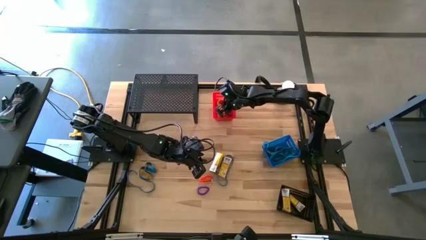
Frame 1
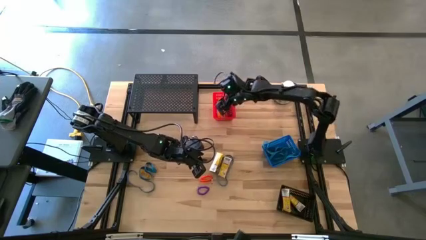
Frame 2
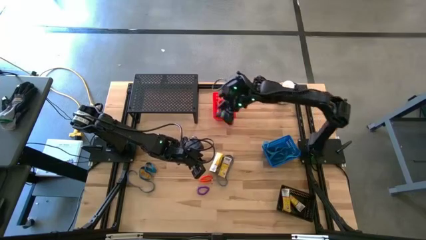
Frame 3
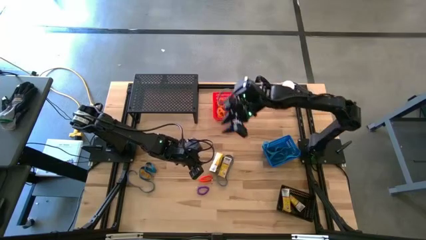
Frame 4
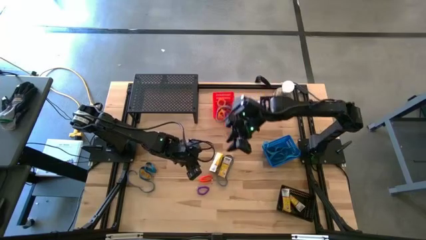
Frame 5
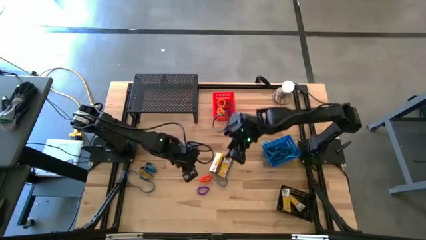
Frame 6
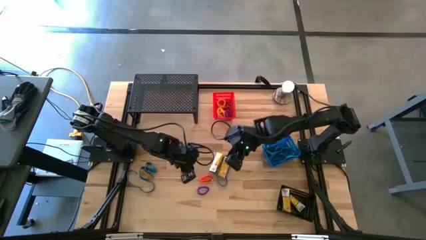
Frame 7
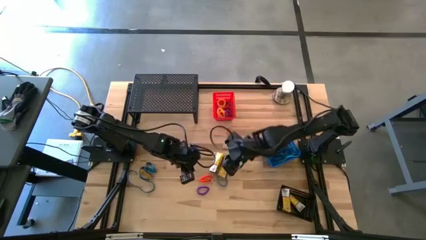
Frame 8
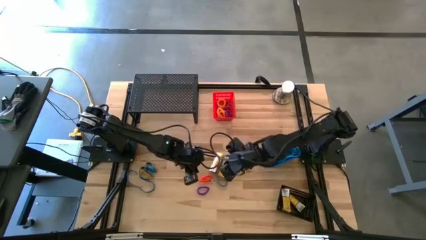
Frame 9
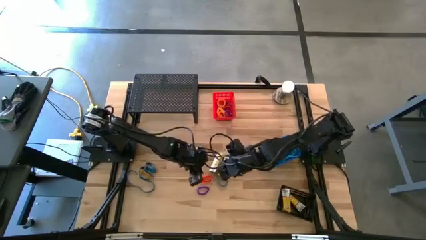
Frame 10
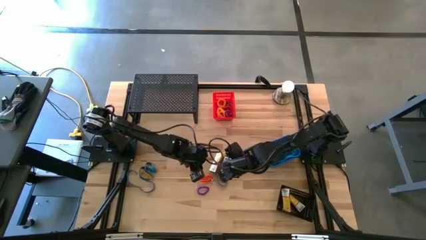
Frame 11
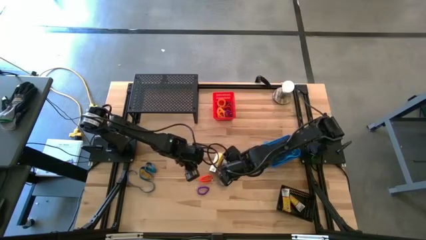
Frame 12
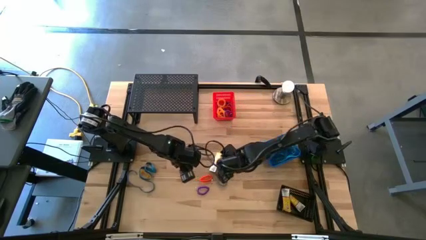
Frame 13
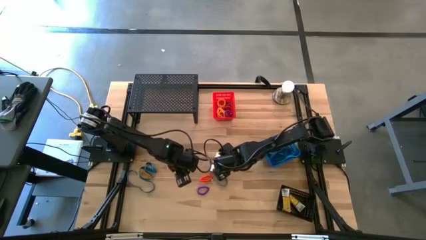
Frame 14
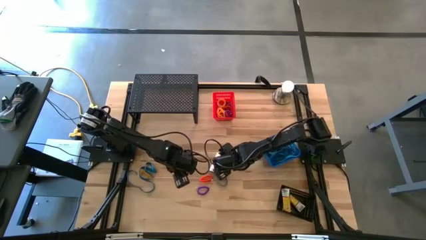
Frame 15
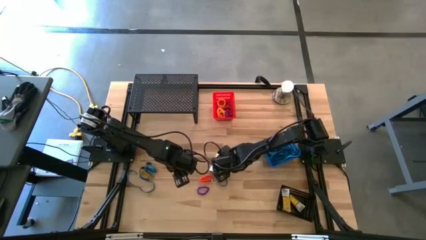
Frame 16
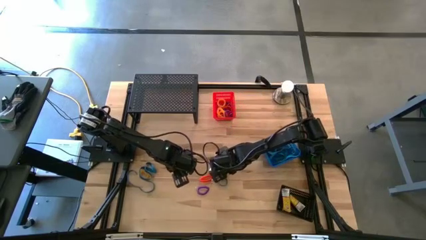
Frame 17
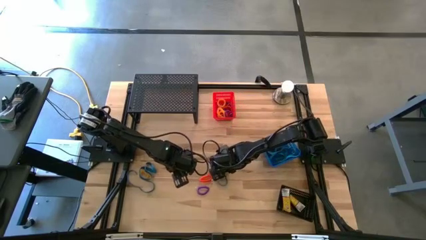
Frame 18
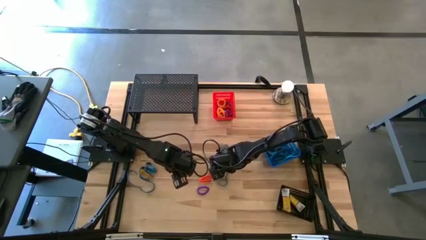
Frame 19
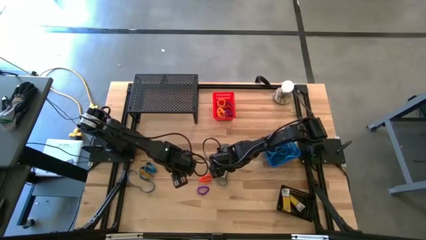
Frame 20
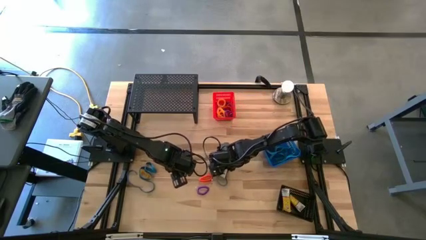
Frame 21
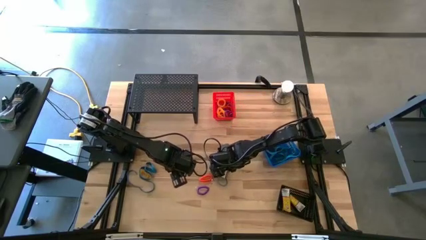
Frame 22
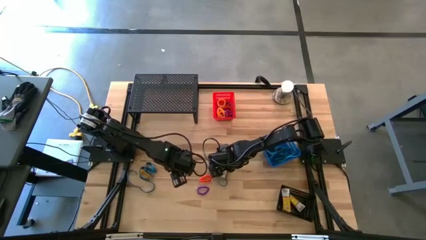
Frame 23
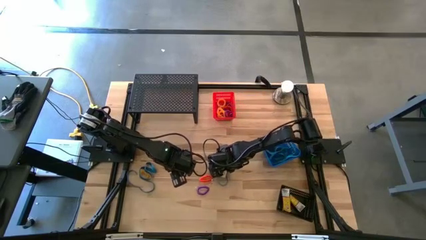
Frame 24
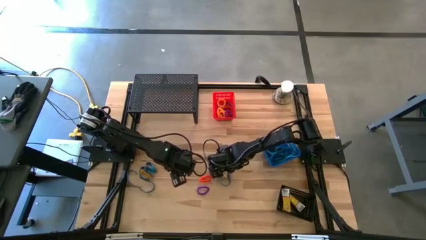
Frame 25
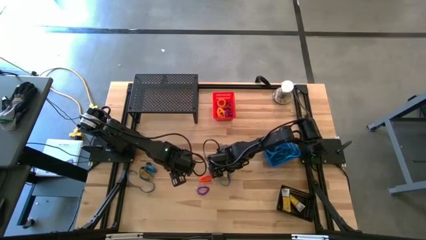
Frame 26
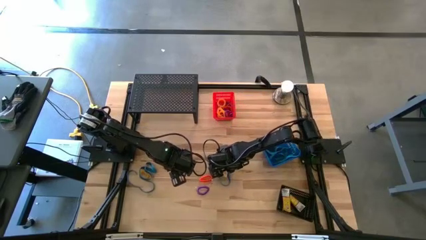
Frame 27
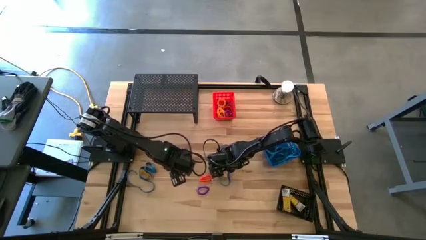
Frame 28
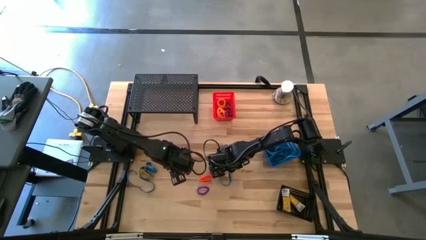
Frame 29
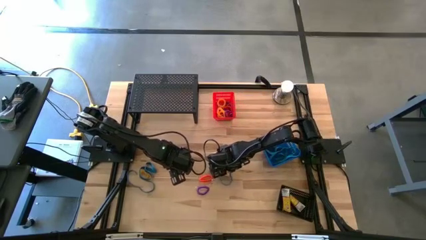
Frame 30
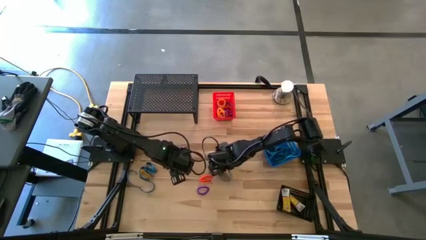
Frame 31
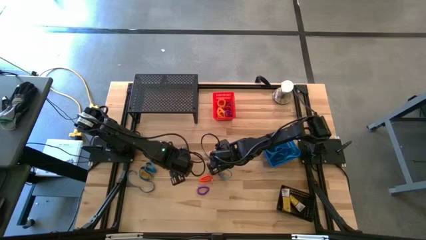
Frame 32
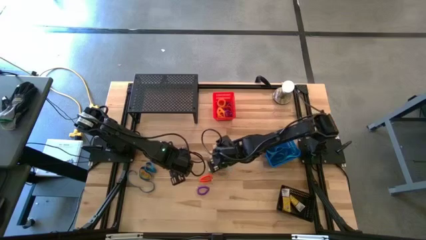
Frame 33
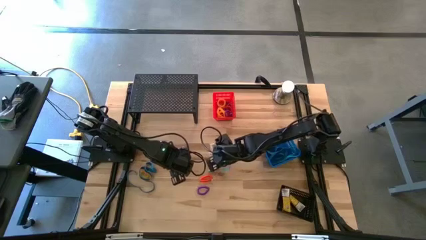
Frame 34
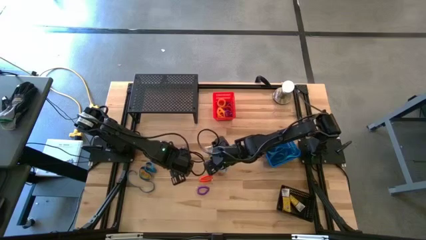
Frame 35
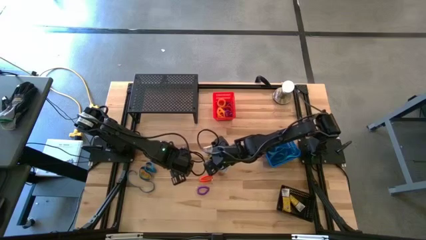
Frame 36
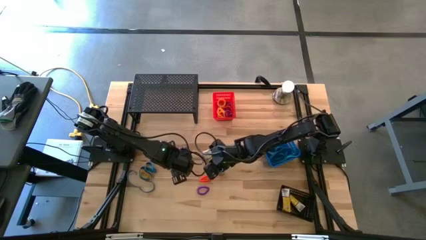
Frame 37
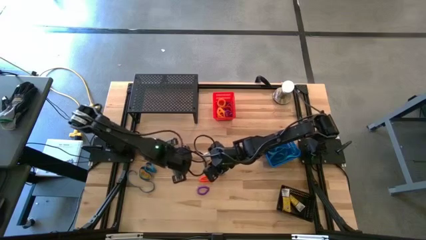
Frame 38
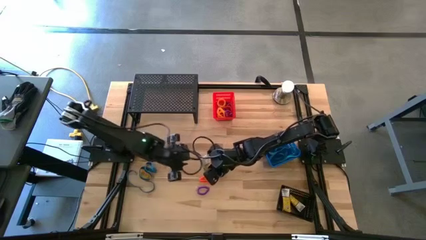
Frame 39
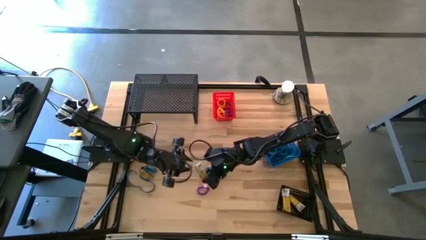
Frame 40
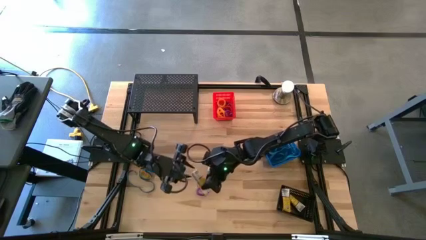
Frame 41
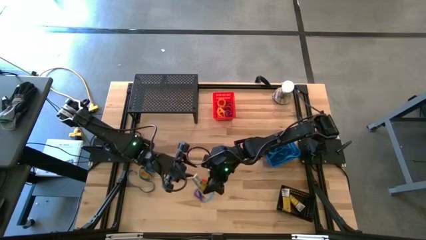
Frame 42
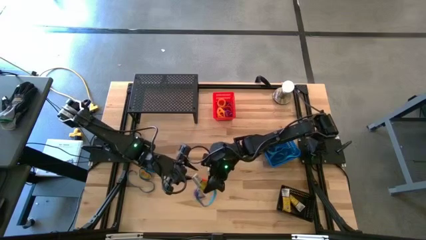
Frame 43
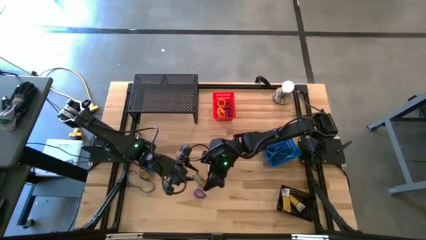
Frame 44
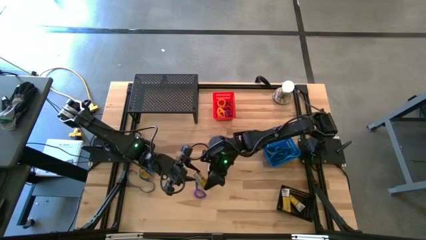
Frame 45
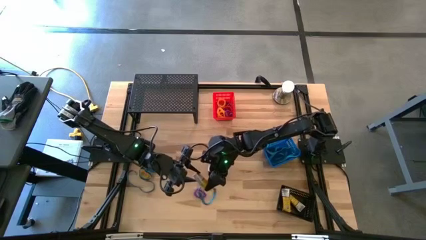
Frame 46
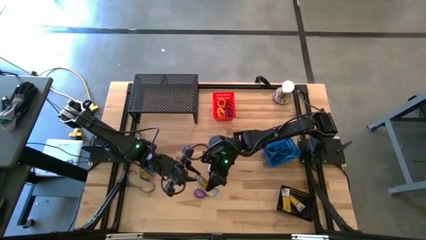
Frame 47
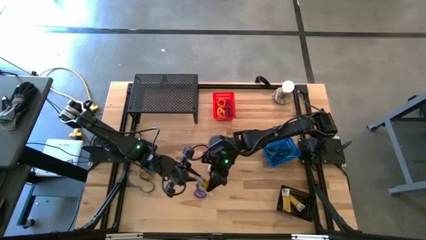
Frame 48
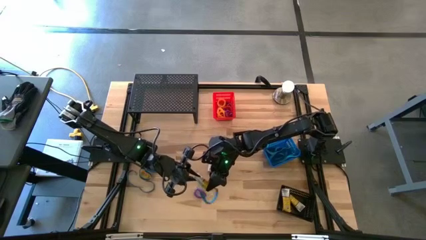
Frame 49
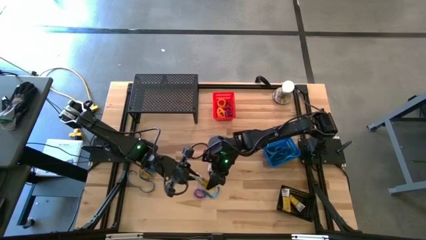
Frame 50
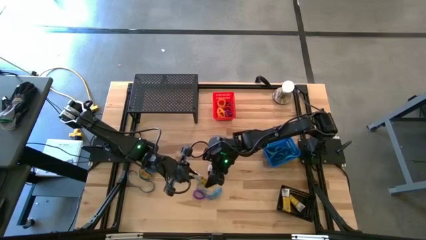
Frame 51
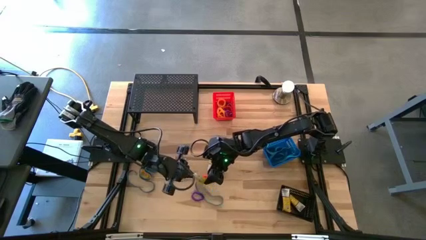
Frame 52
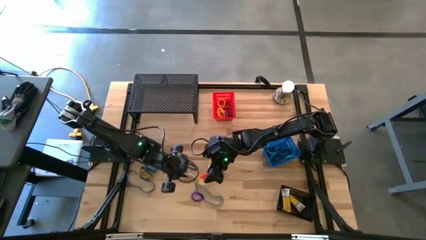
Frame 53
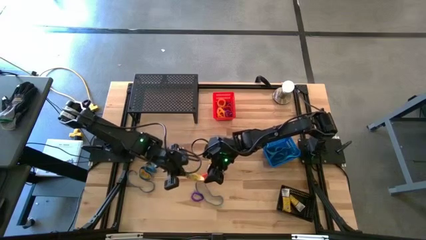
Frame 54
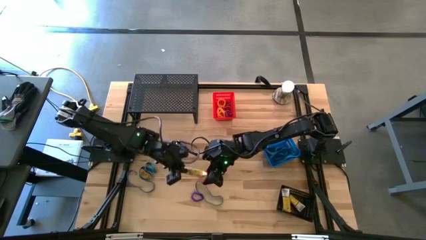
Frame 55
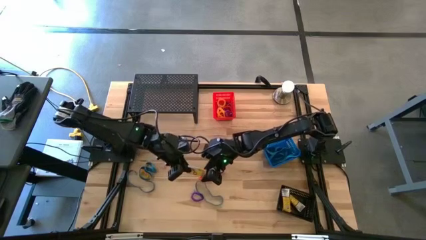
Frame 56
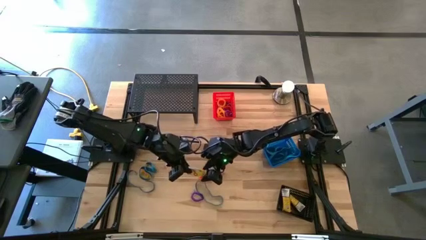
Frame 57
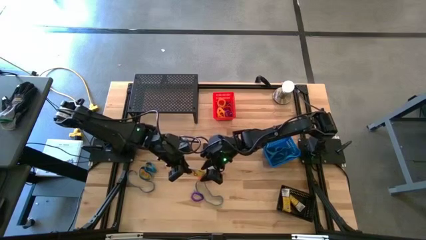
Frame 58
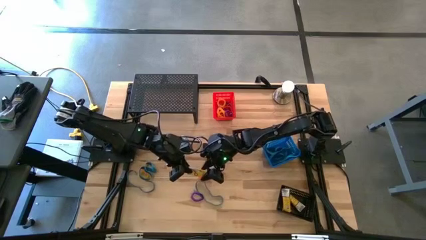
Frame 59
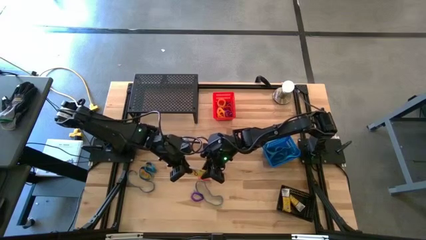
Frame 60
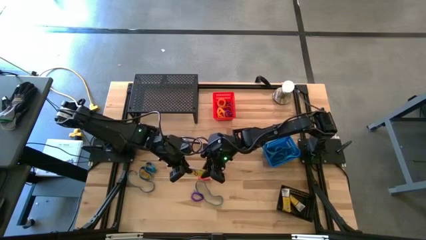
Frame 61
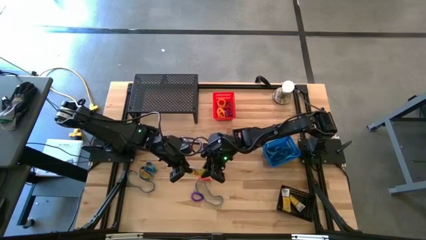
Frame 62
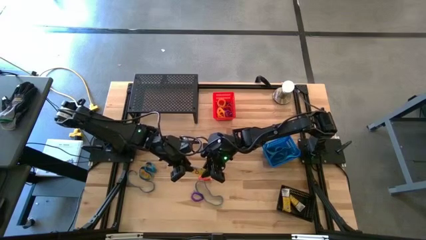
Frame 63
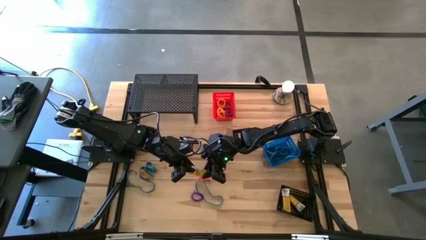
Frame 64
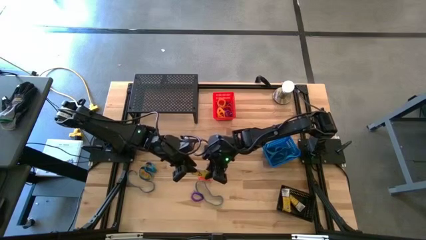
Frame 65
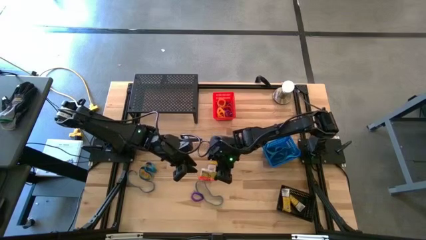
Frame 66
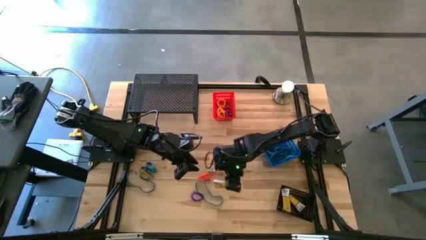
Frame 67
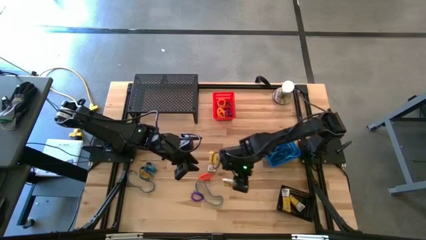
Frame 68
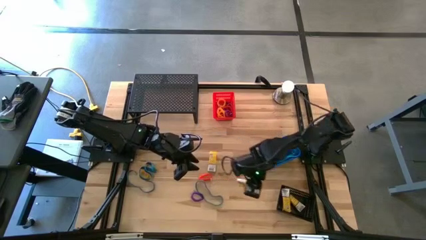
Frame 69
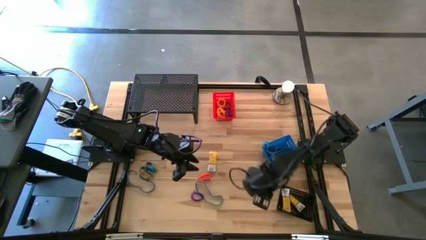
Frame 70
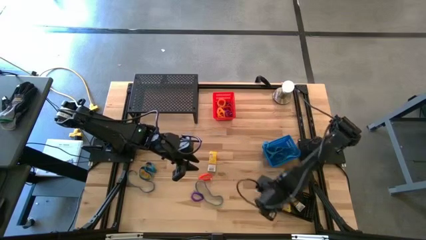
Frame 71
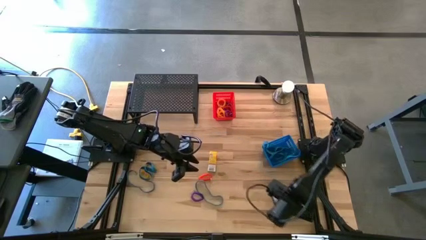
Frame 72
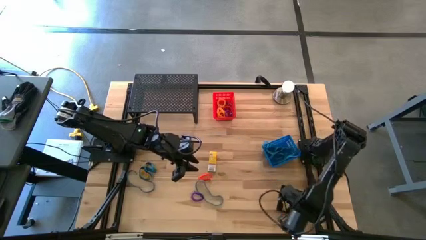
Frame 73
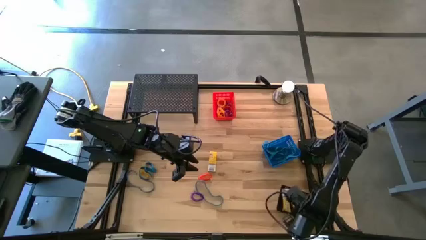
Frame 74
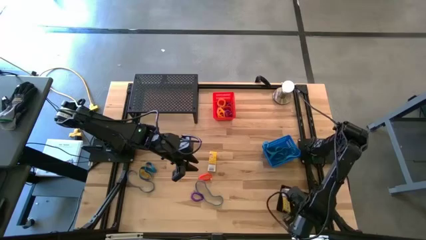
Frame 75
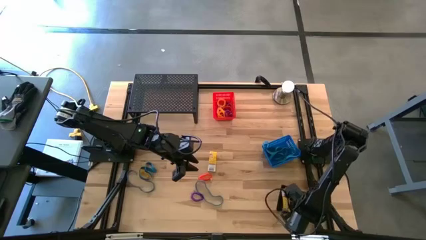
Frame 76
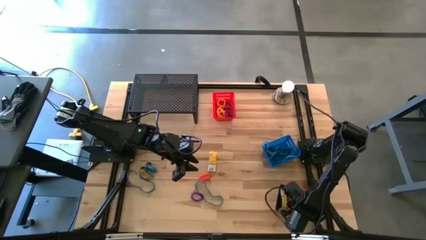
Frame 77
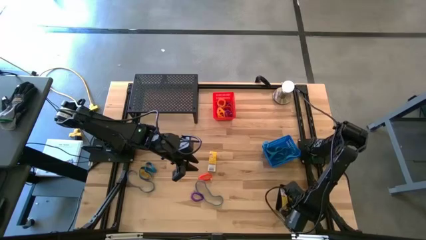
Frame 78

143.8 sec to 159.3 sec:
Task: Pick & Place Office Desk Supplies
Put the left crayon box into the black bin

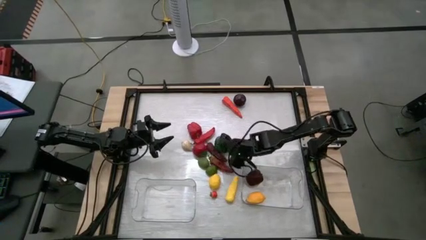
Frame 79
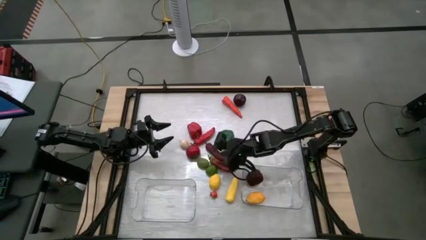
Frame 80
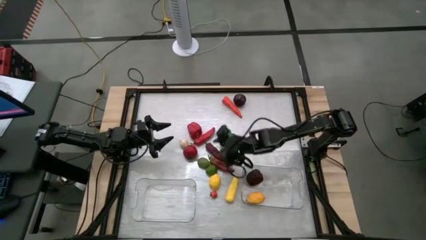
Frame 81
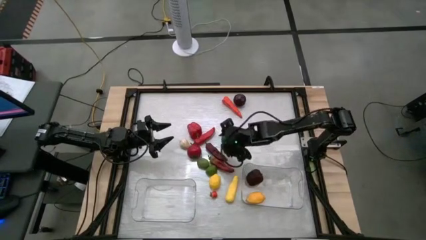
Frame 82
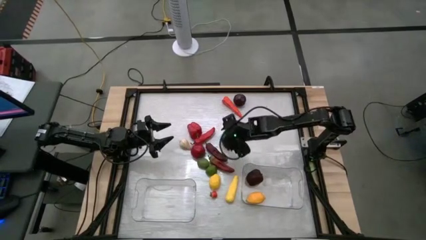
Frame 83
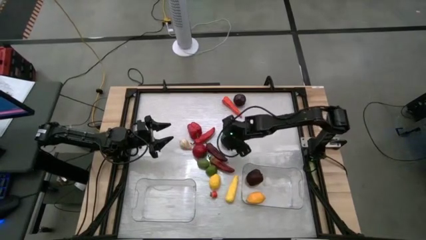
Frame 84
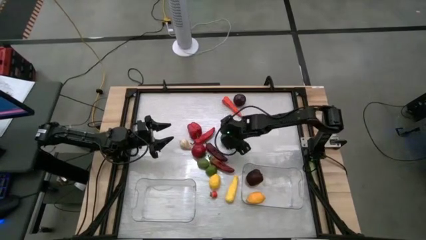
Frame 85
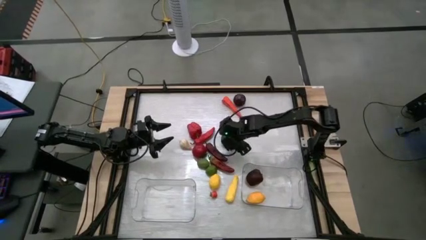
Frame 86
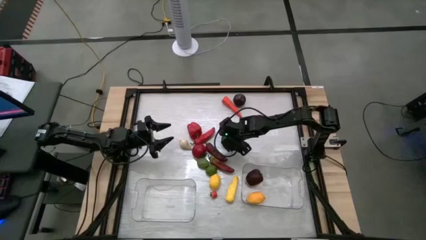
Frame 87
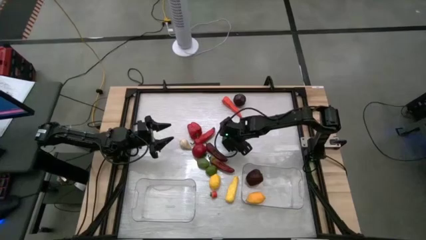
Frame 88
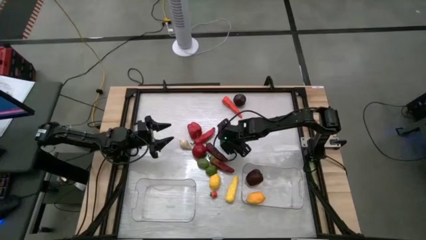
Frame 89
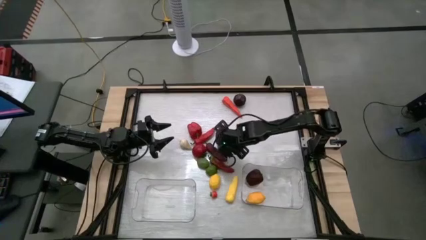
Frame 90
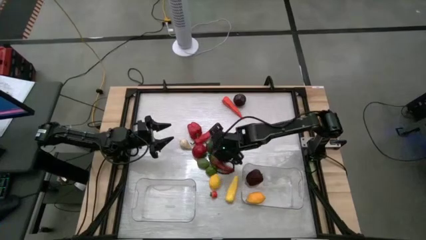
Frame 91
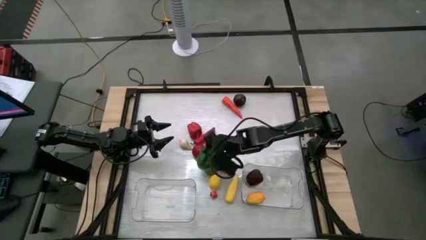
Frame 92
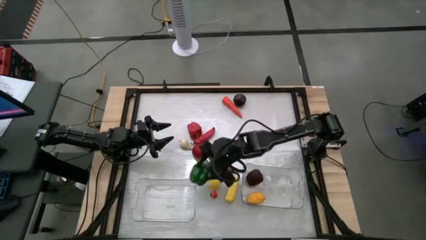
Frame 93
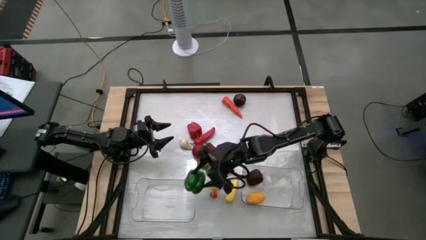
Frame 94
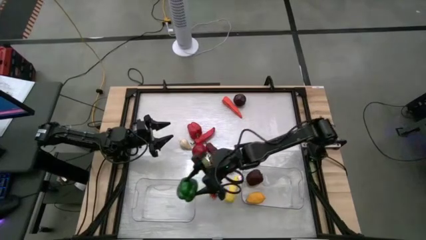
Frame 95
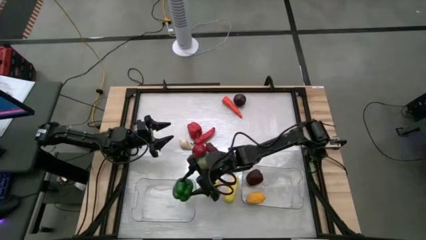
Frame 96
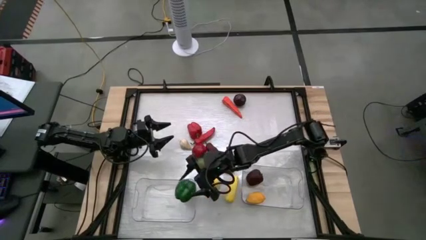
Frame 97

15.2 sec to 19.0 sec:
Task: Sort produce into baskets
Put the green bell pepper into the right transparent bin
